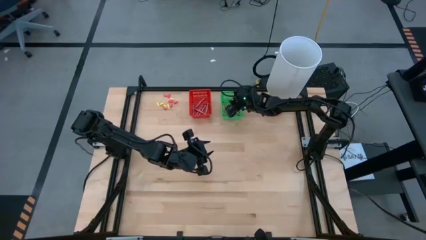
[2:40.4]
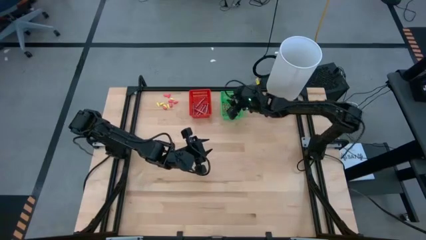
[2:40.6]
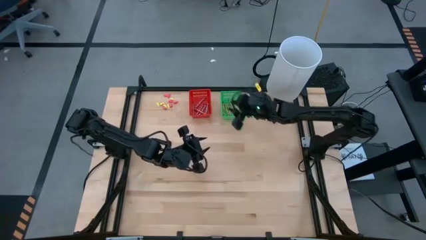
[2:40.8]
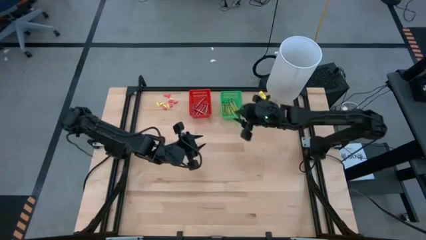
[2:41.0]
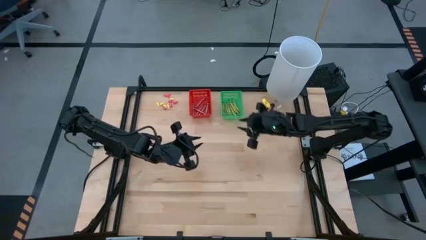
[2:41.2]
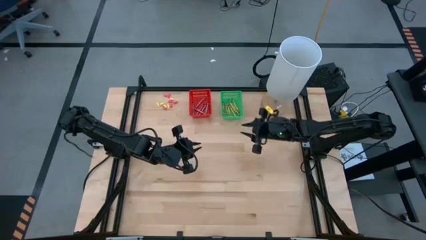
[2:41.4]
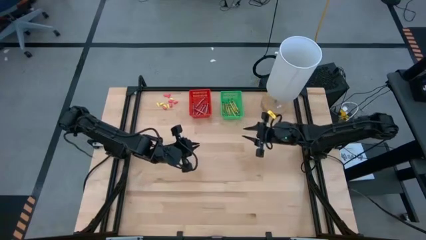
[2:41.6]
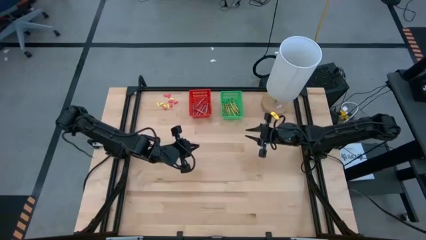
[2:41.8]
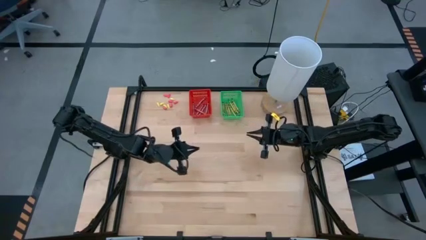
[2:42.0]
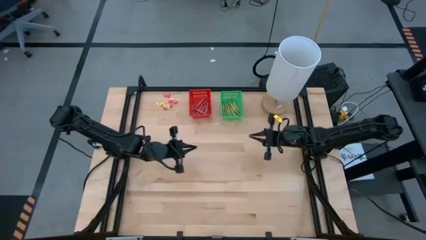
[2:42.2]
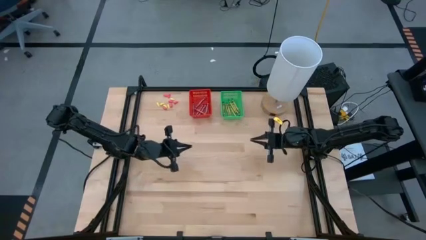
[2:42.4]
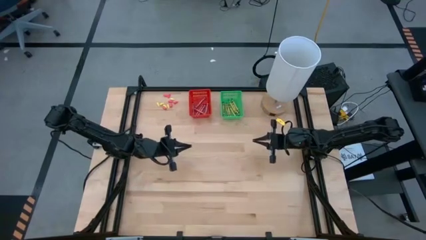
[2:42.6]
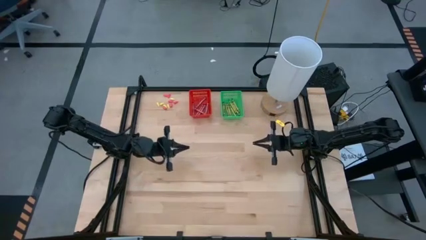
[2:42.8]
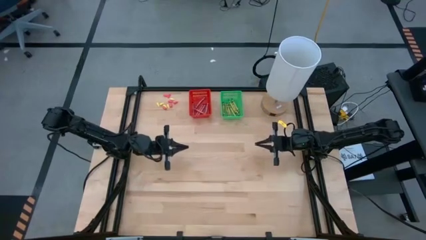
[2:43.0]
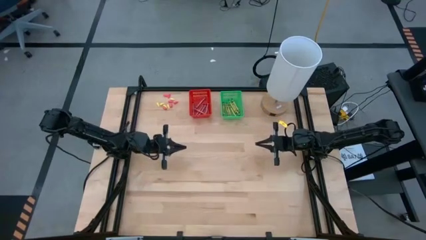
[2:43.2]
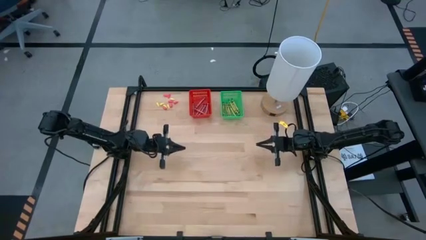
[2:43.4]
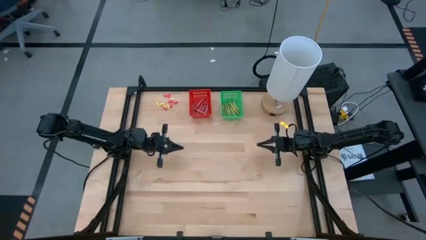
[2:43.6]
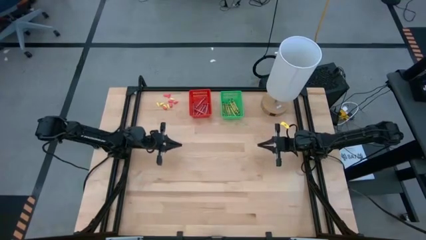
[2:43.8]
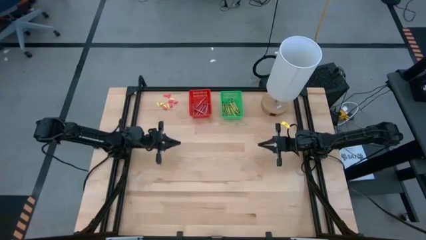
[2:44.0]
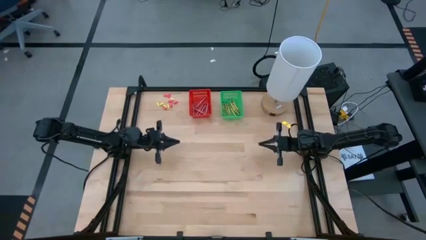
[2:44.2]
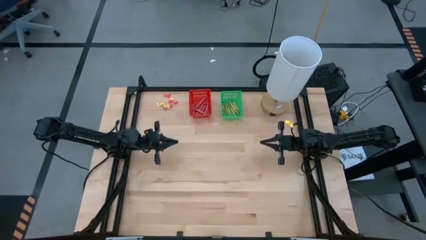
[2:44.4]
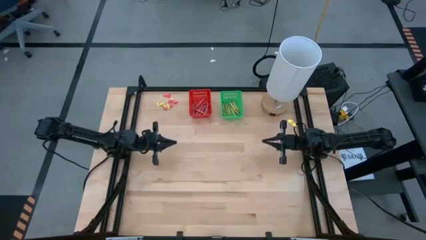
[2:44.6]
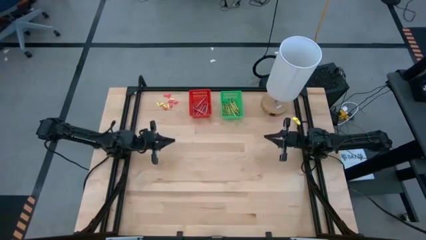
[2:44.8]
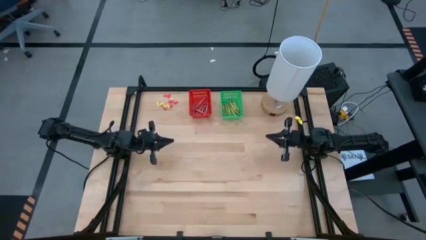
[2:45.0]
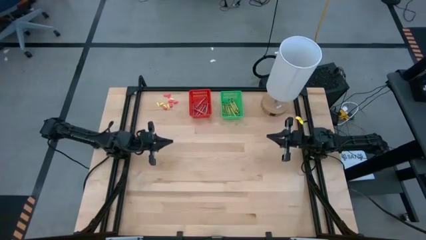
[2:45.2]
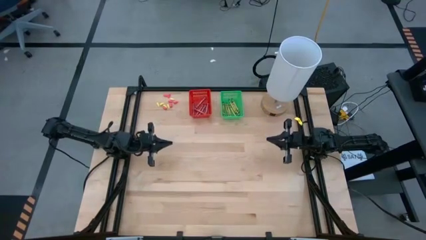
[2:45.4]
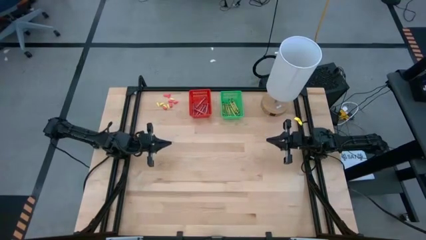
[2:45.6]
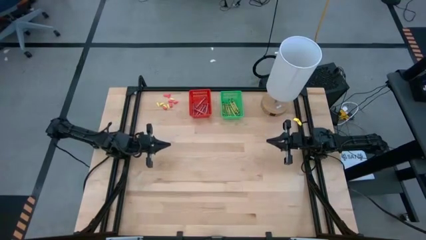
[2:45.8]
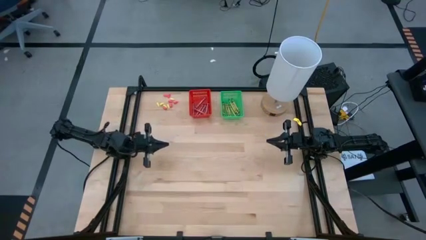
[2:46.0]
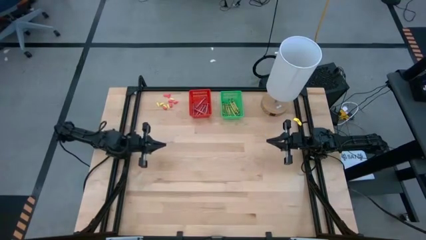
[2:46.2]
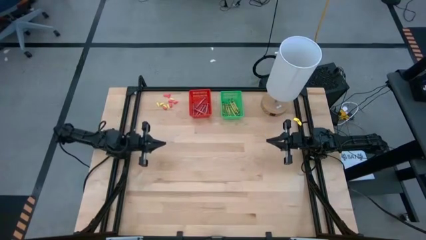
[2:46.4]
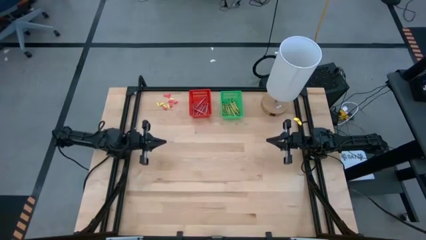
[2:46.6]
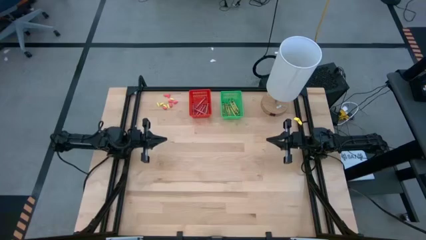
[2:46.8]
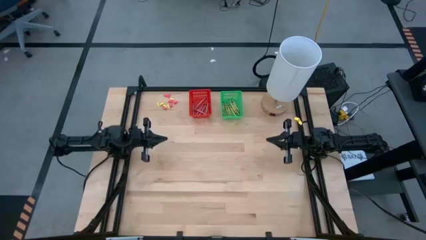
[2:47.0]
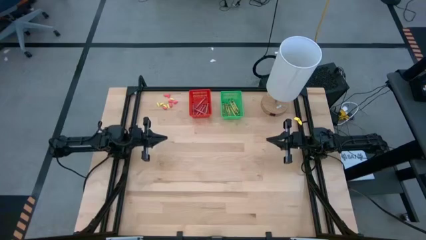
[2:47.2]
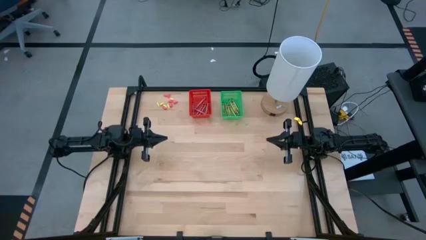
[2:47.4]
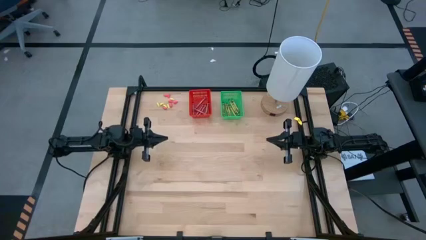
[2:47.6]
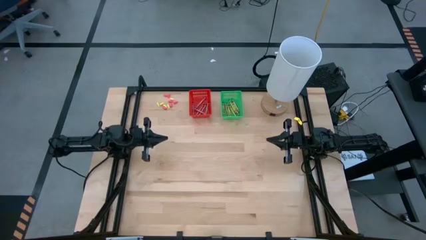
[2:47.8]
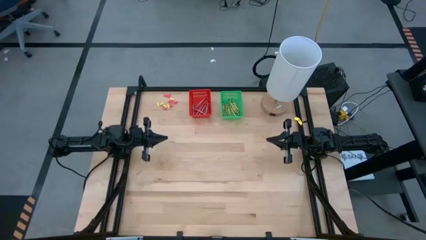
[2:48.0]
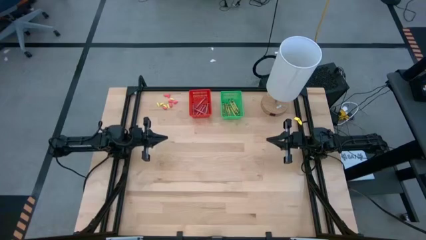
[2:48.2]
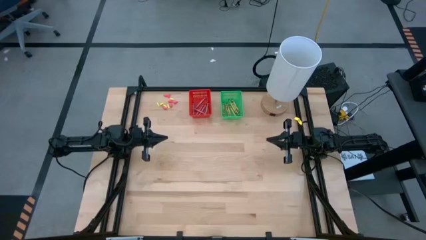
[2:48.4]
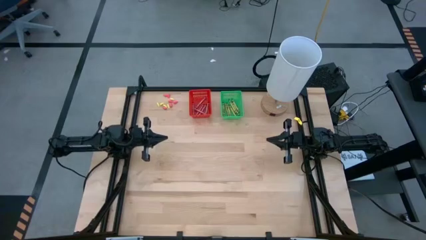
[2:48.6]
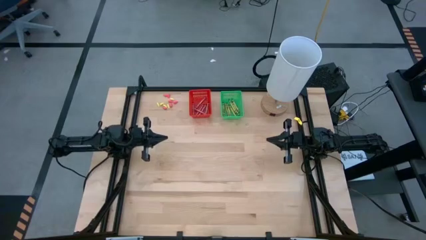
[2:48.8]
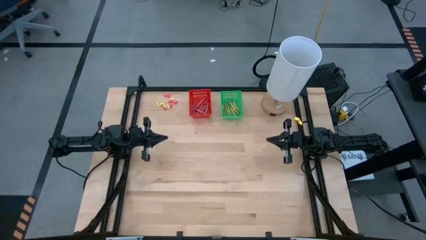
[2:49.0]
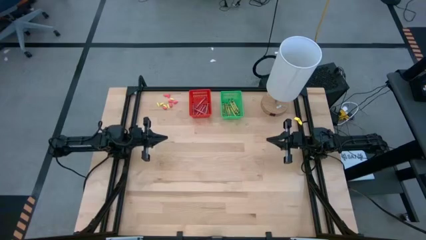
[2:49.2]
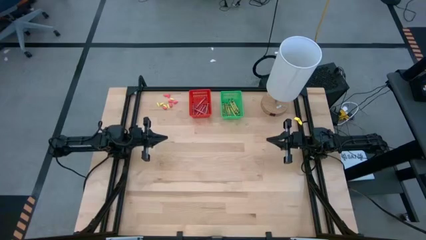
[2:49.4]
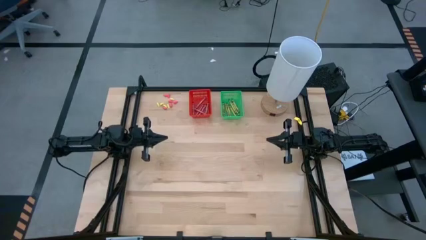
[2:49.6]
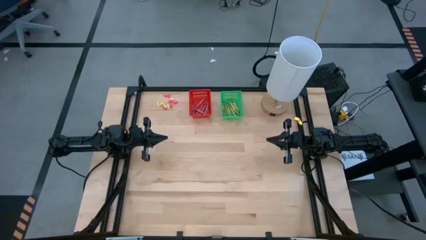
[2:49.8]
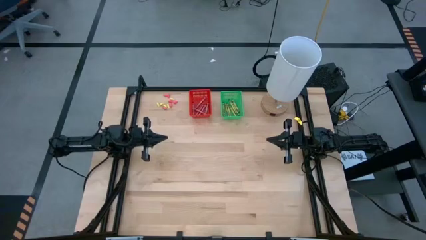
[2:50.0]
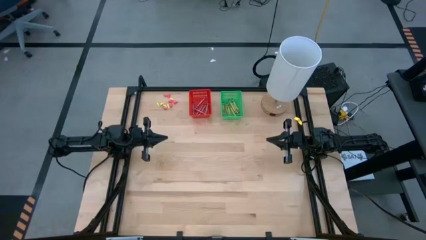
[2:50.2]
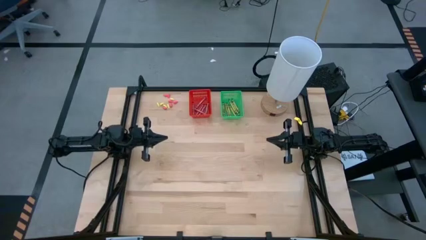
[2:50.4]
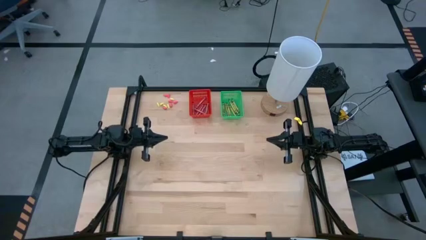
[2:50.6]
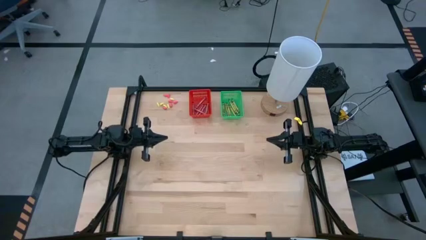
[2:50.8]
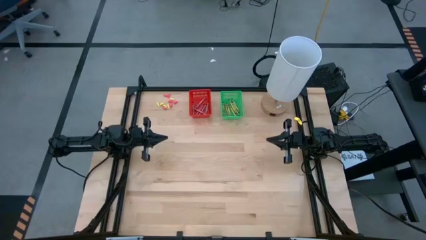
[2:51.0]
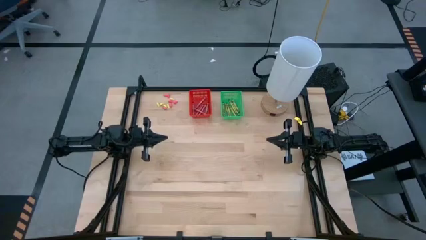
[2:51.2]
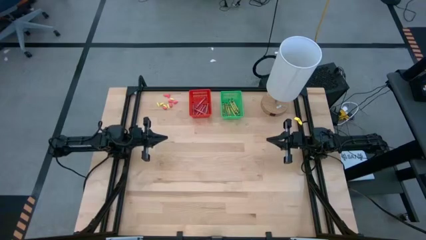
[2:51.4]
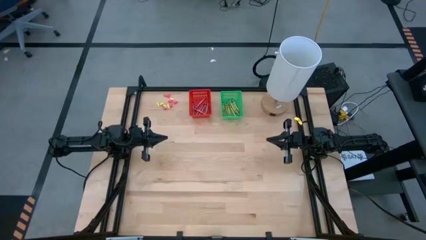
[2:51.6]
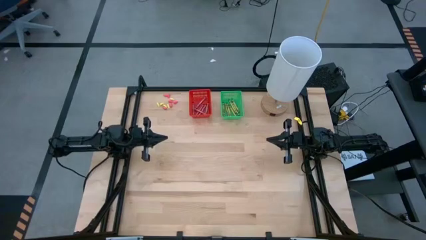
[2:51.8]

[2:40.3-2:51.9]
Task: Sort crayons
Return to Home Position
